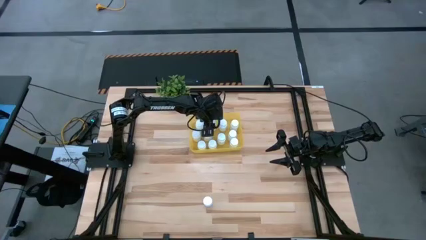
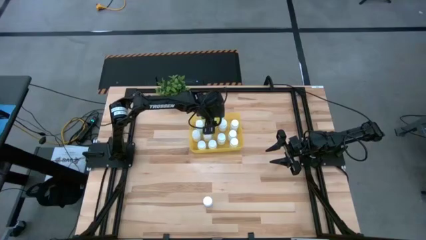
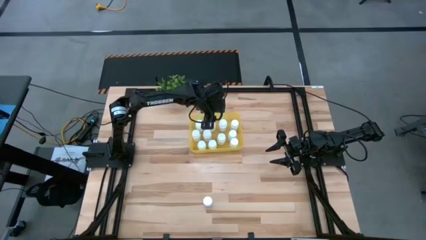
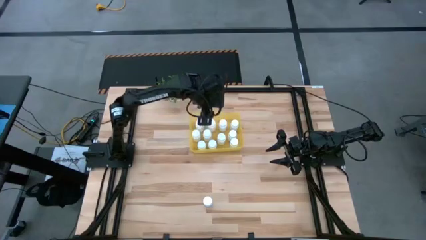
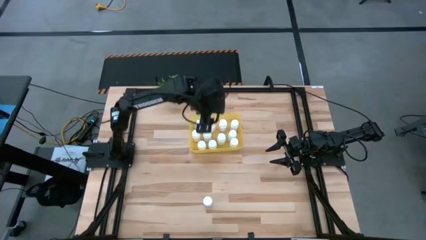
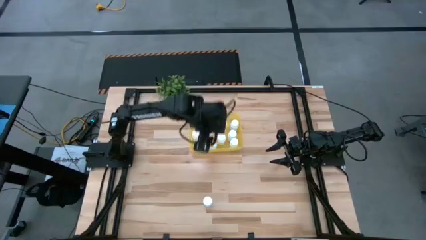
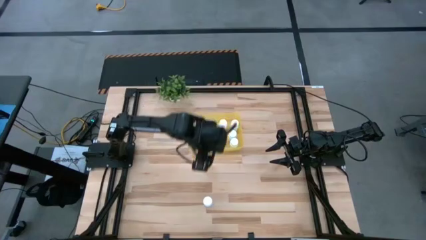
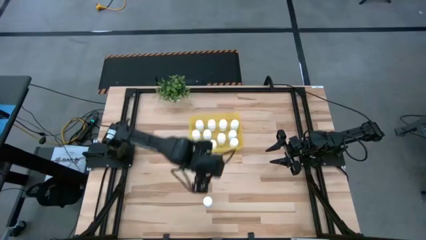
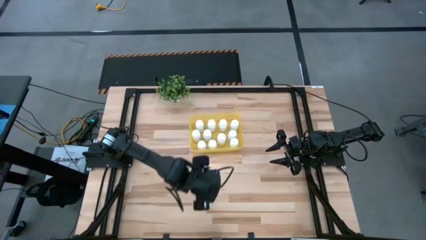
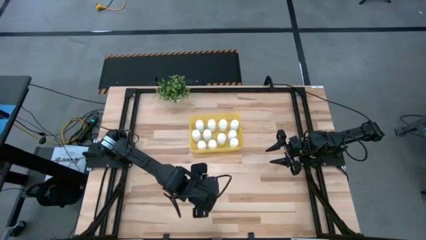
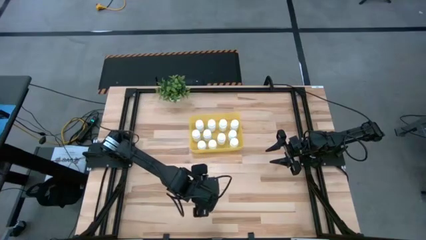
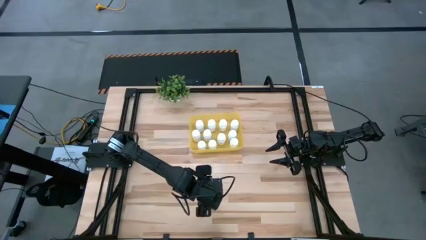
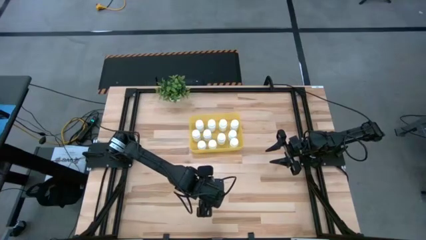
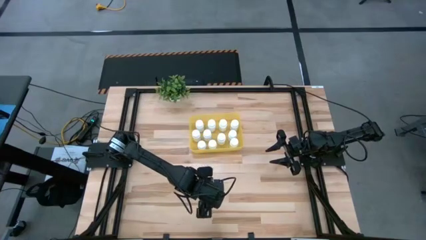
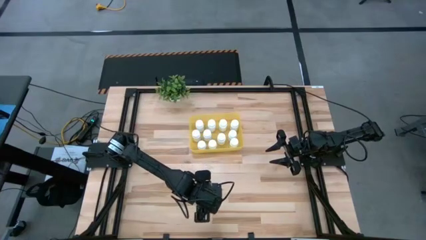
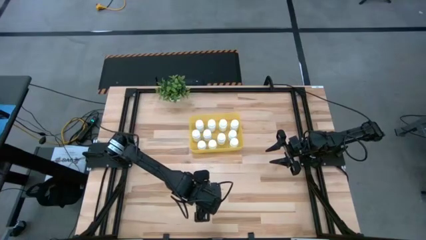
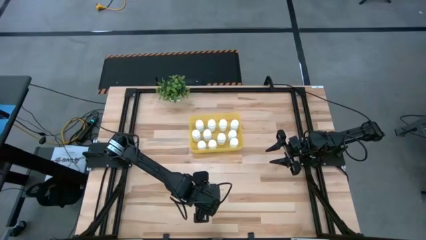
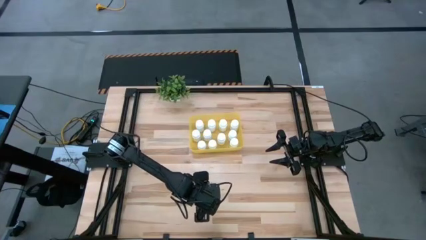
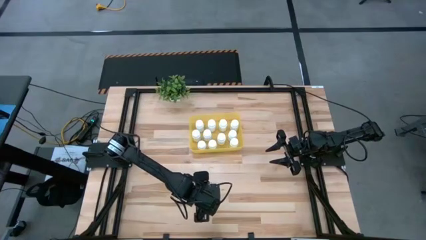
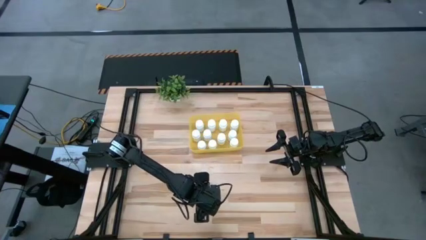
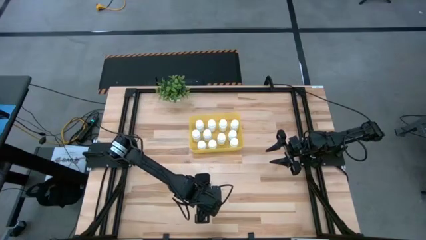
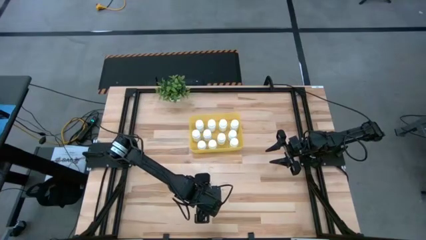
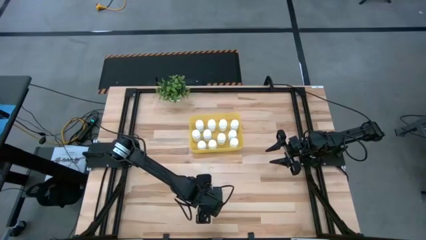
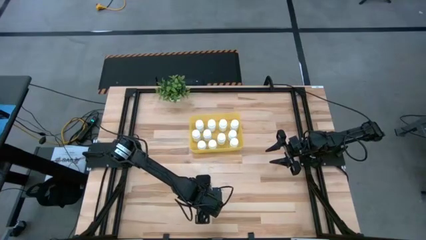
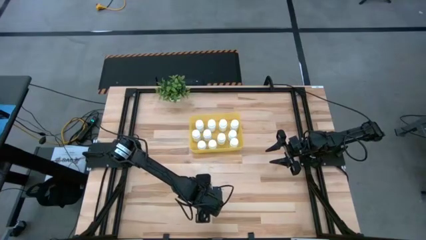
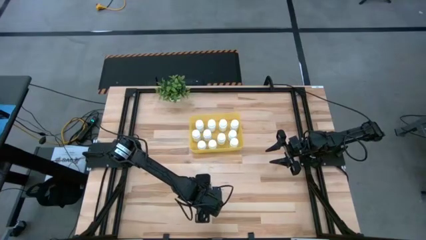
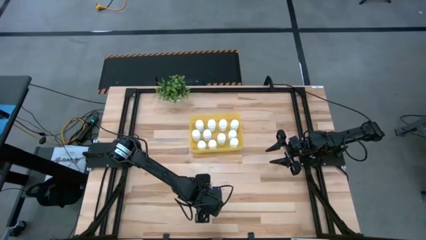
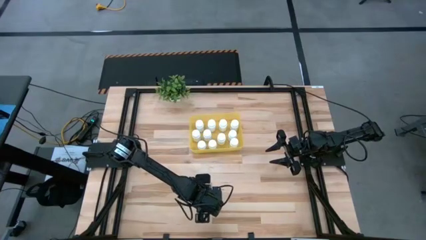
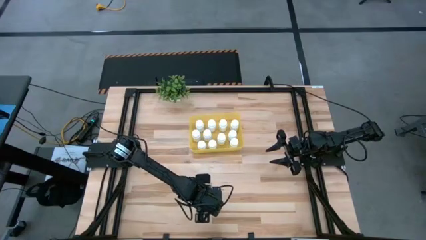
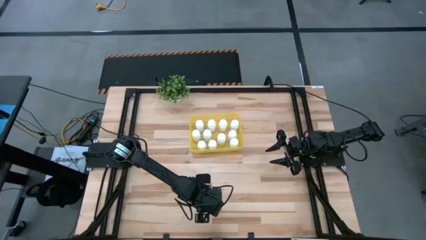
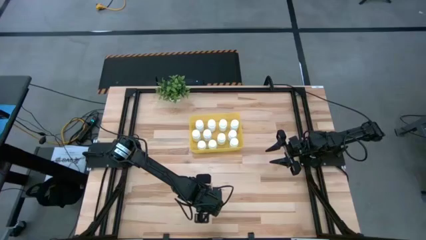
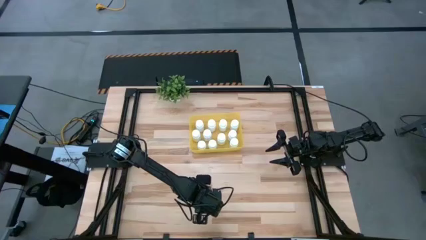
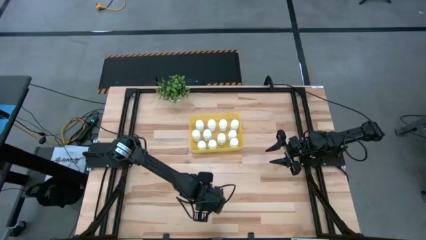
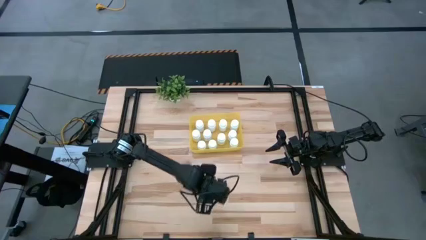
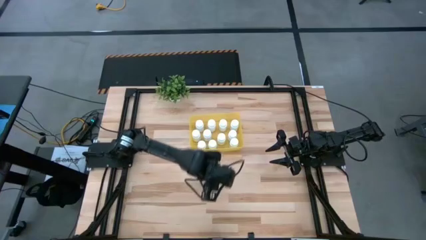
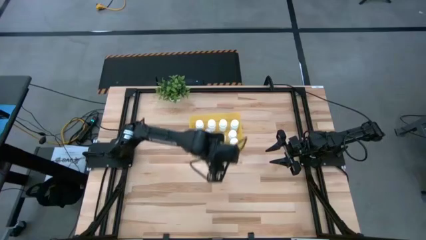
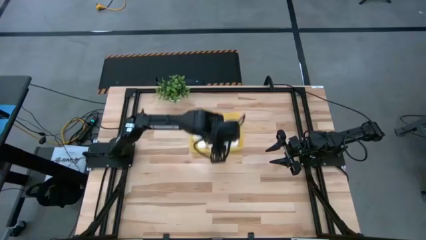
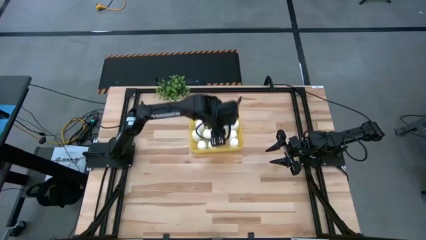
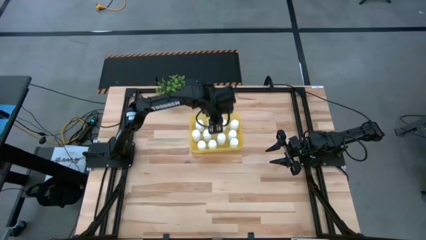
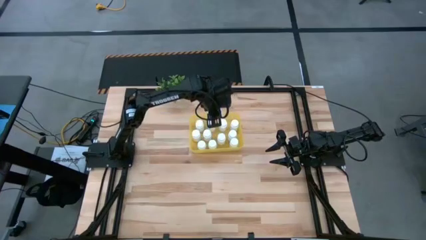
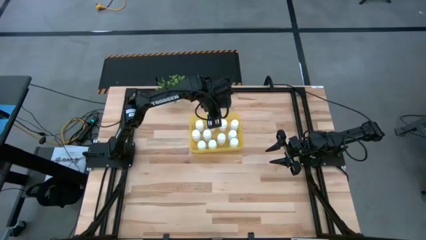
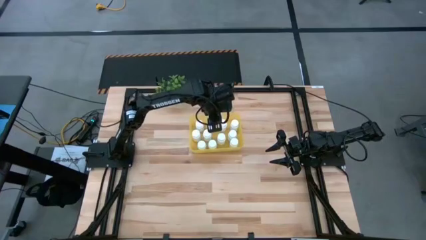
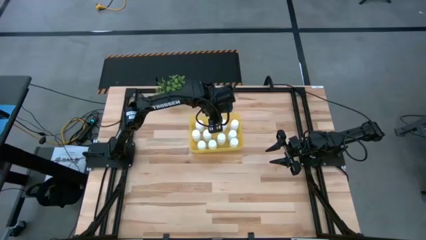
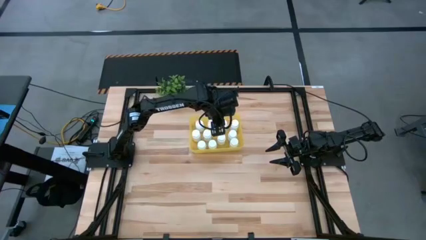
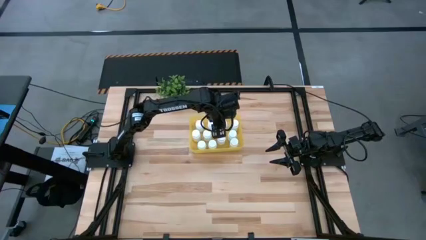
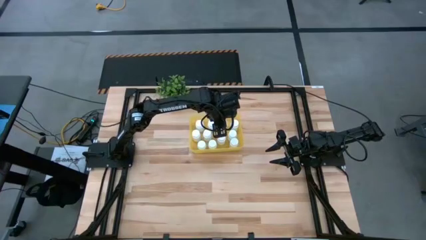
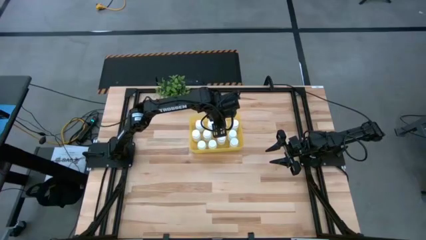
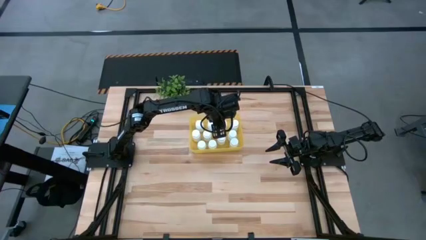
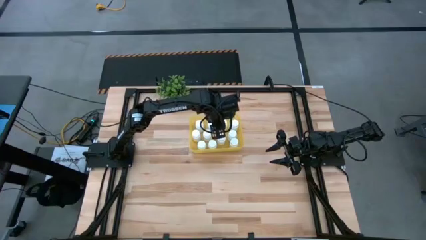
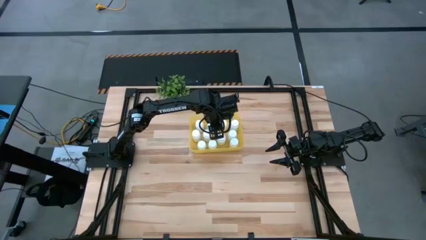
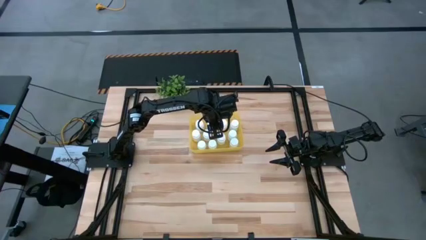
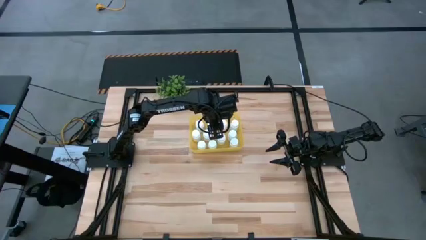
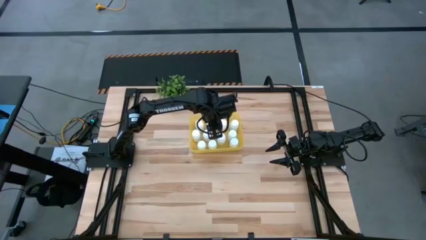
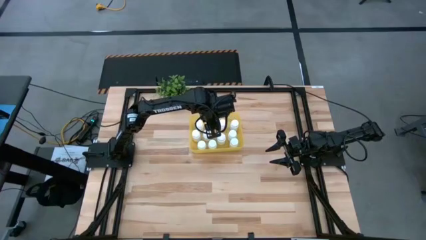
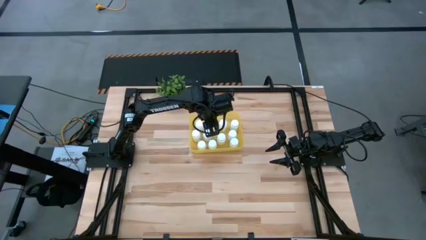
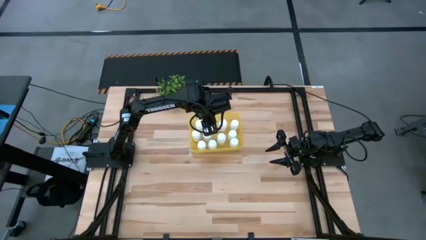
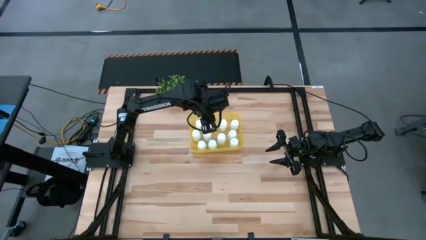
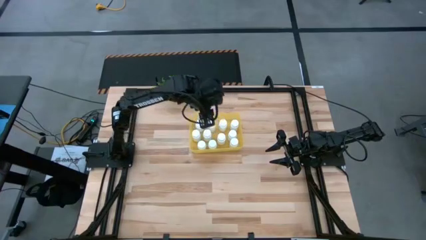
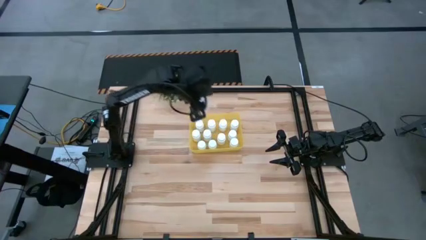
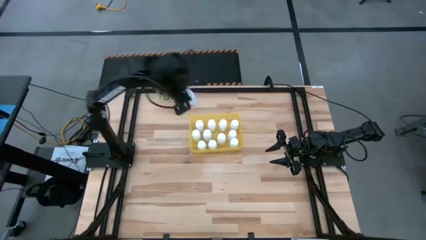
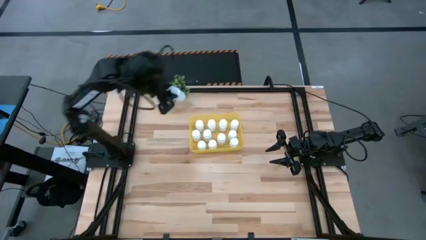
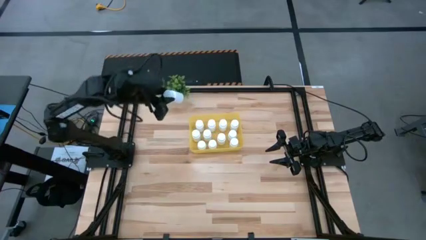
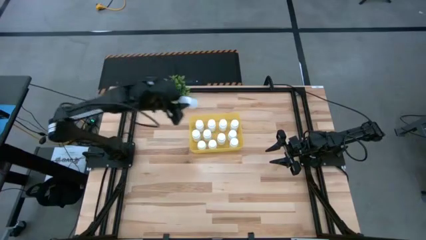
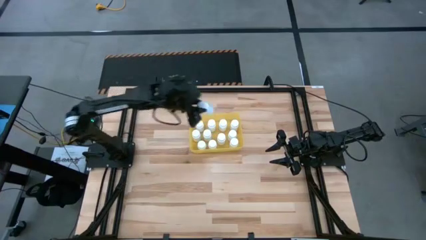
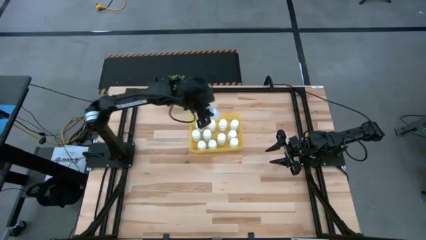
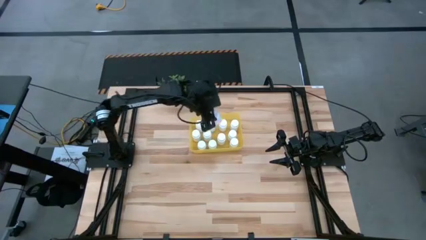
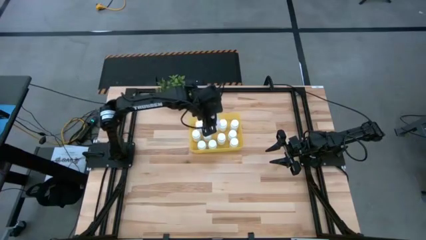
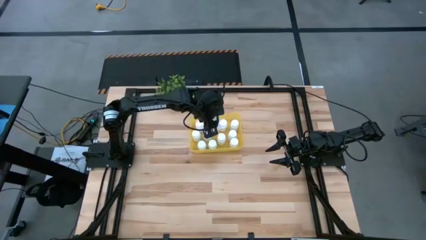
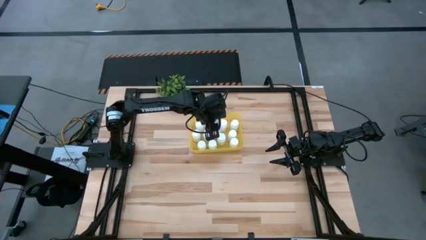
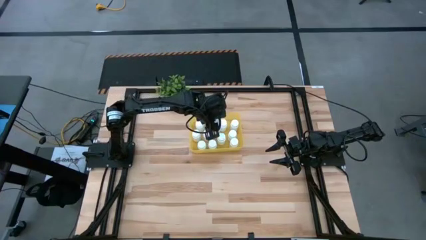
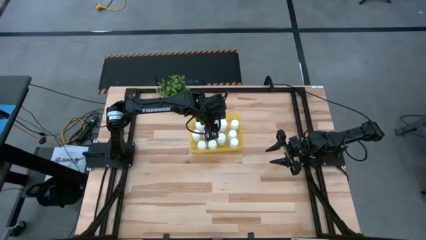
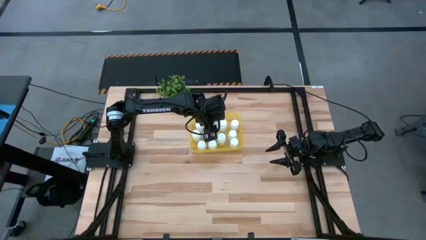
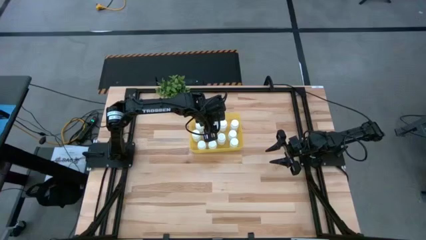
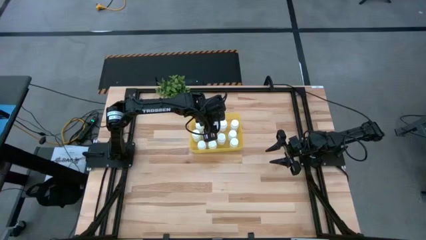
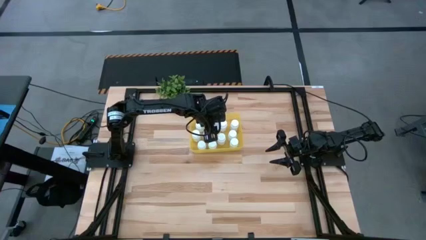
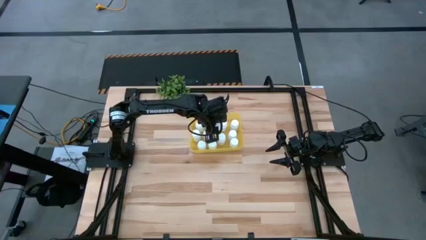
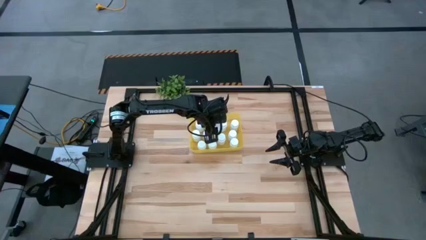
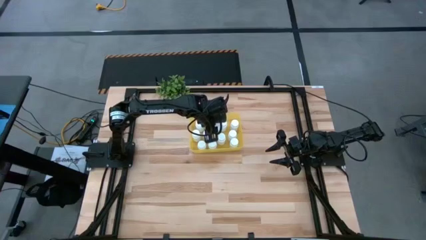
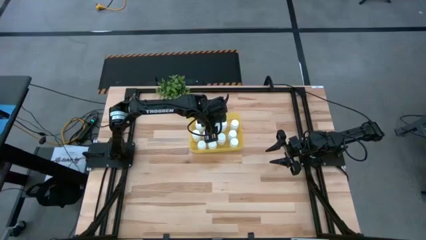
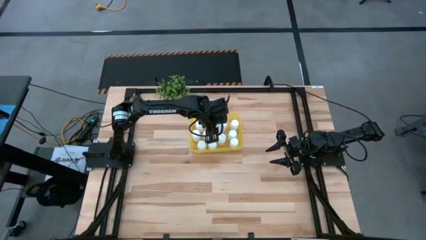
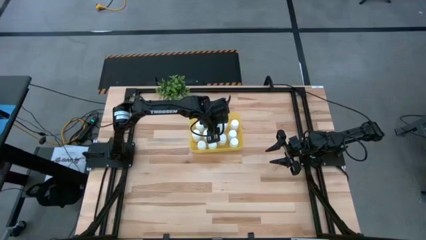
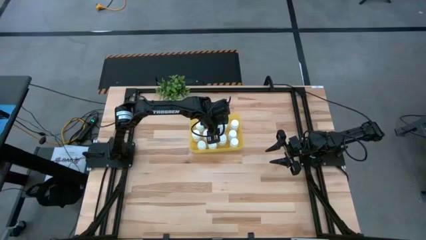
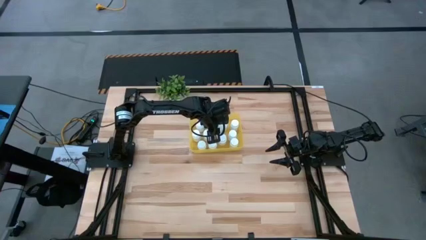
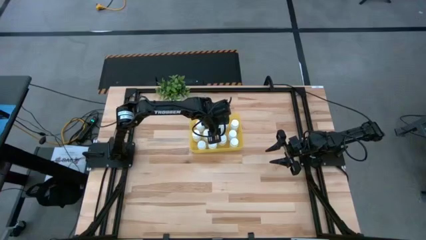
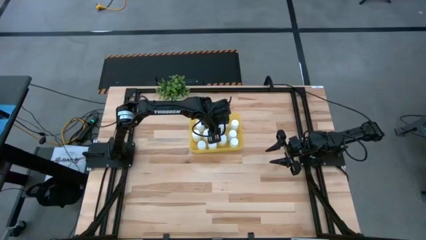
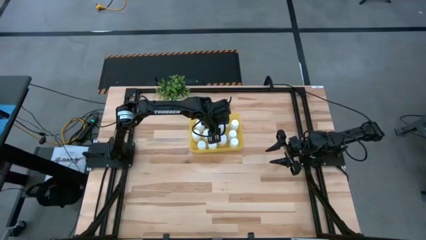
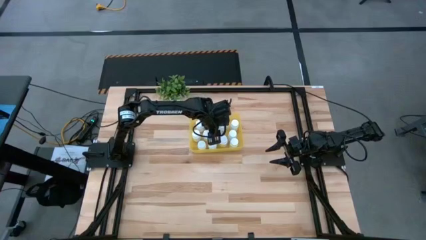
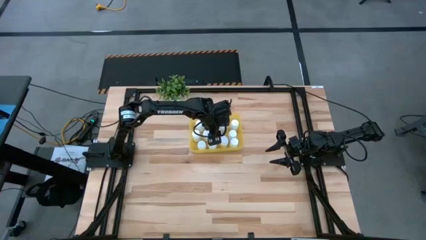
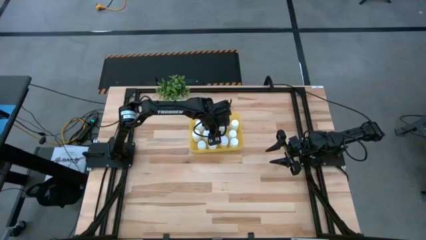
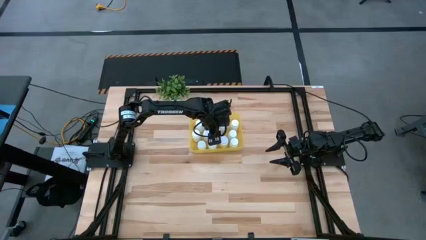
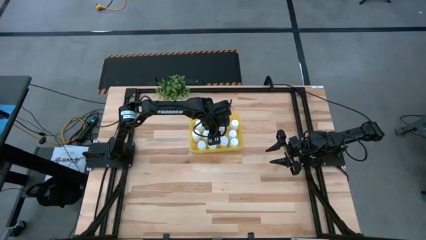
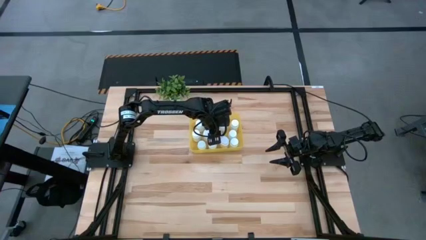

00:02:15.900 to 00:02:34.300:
Task: Pick and place pill bottles into a basket
Put the white medicine bottle into the yellow bin
